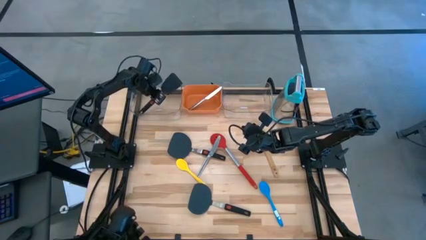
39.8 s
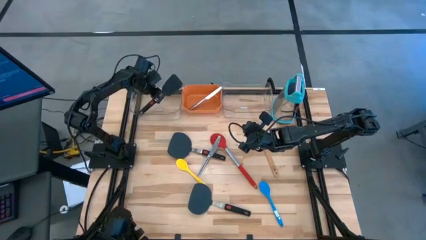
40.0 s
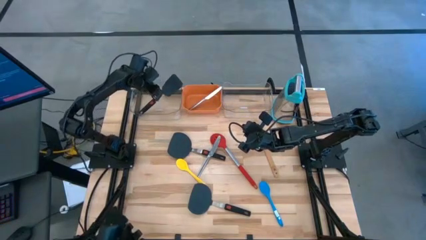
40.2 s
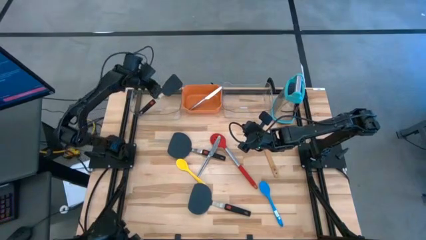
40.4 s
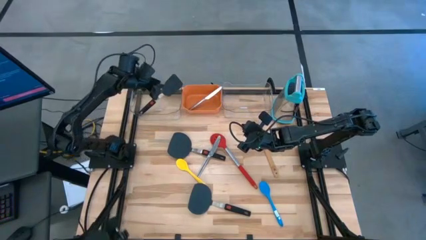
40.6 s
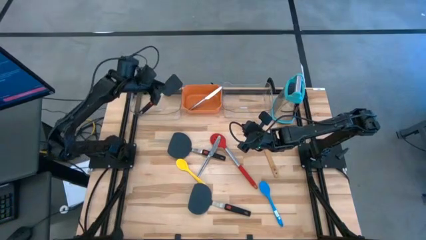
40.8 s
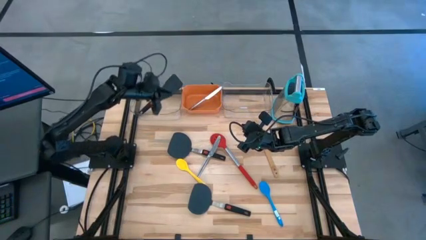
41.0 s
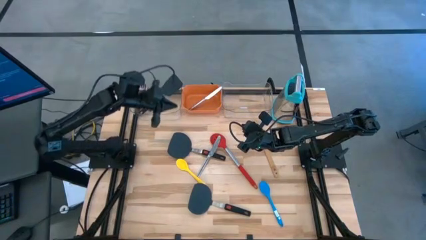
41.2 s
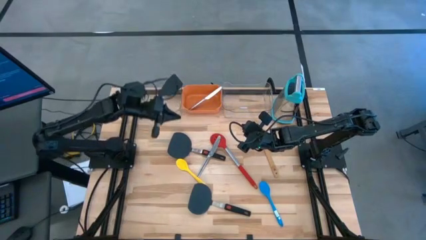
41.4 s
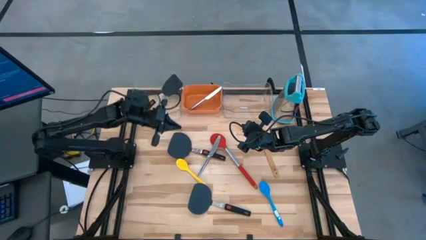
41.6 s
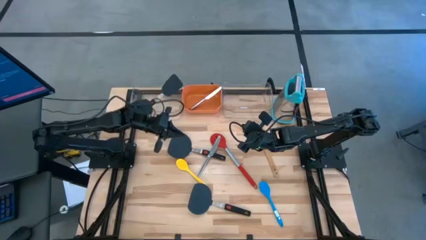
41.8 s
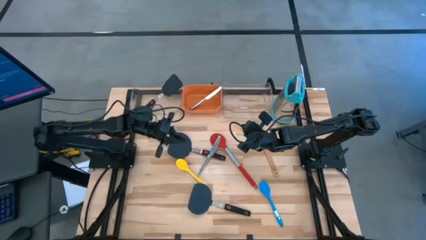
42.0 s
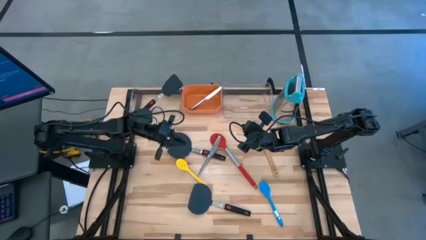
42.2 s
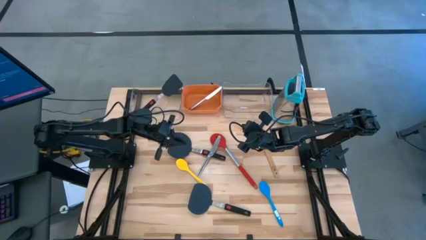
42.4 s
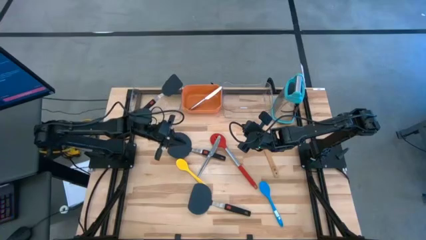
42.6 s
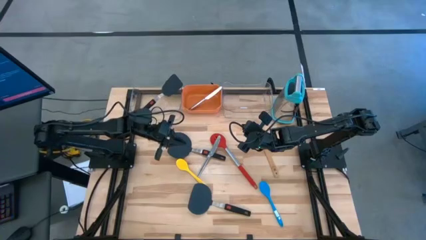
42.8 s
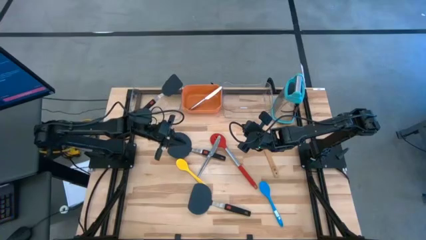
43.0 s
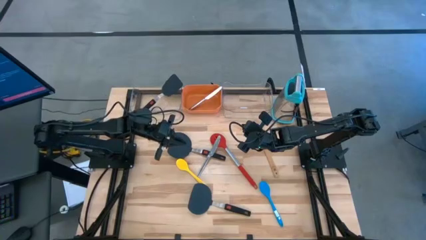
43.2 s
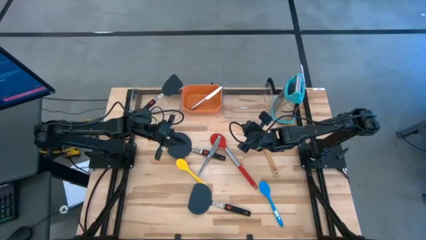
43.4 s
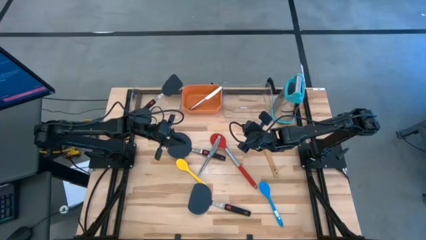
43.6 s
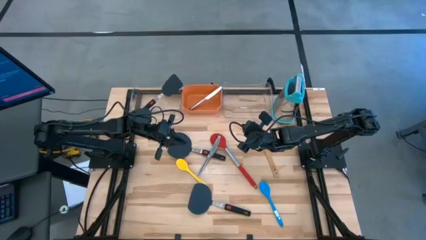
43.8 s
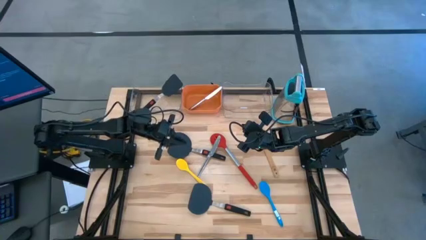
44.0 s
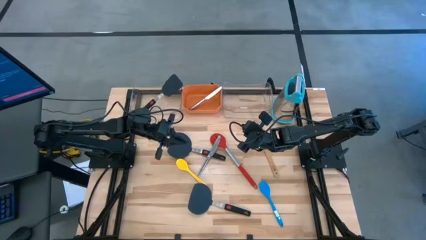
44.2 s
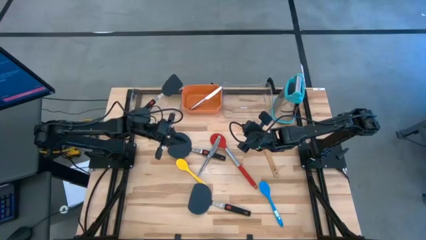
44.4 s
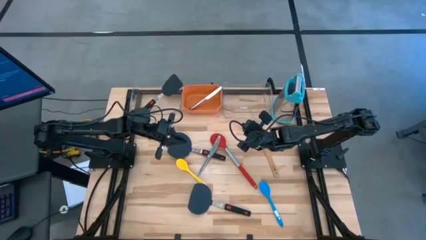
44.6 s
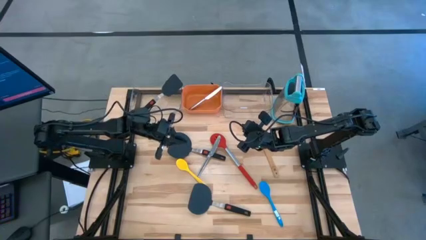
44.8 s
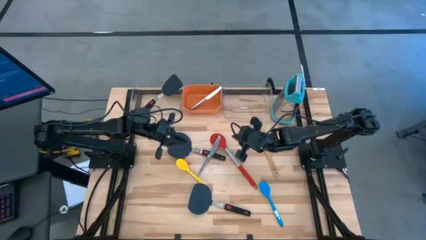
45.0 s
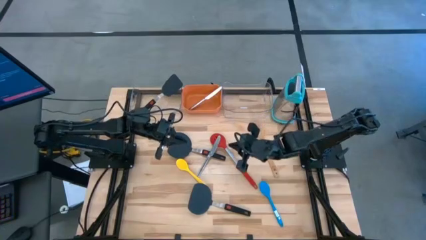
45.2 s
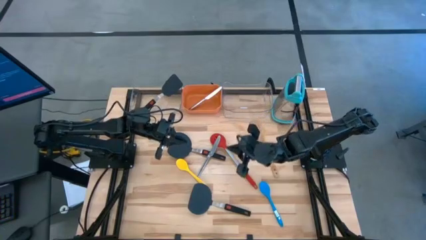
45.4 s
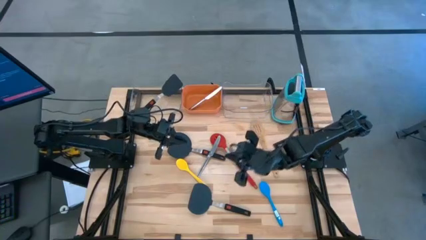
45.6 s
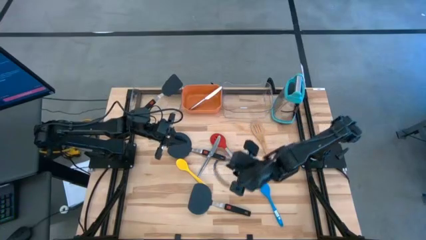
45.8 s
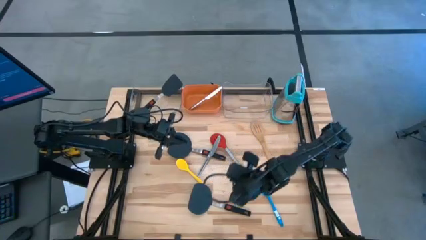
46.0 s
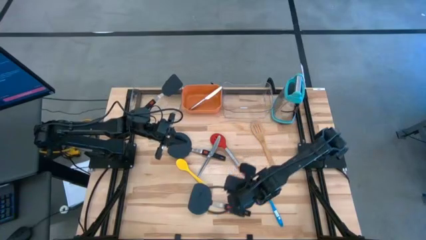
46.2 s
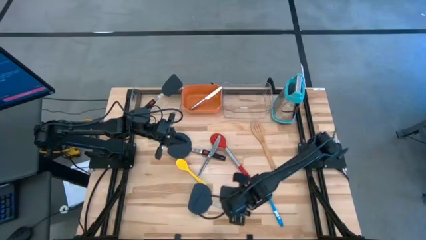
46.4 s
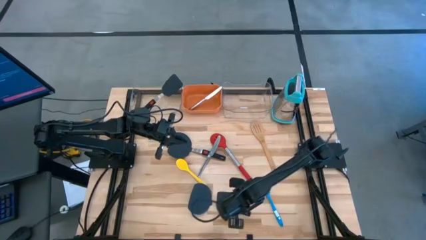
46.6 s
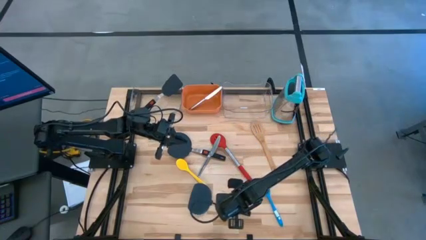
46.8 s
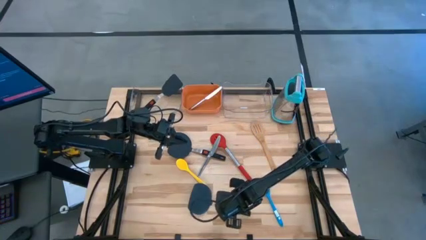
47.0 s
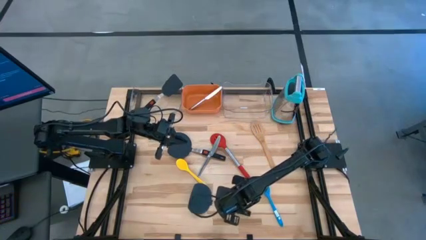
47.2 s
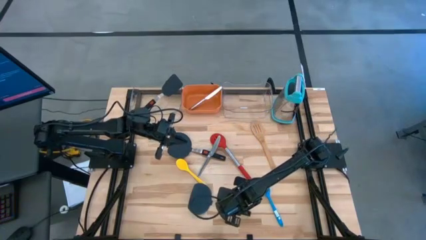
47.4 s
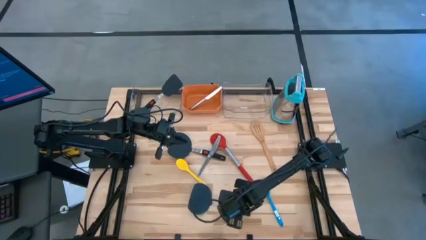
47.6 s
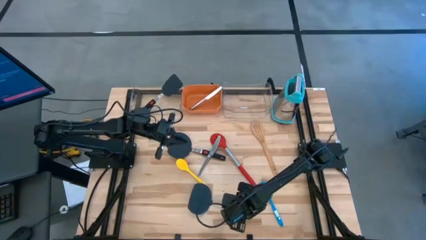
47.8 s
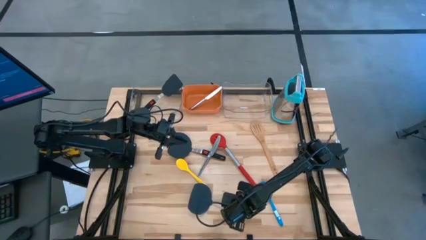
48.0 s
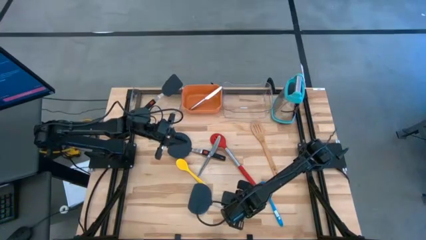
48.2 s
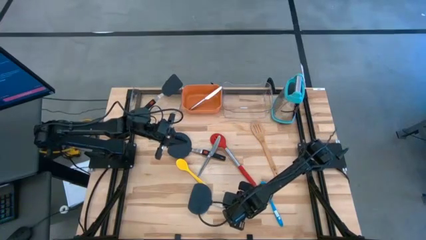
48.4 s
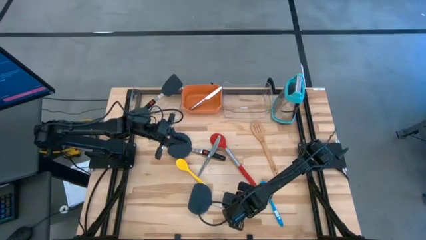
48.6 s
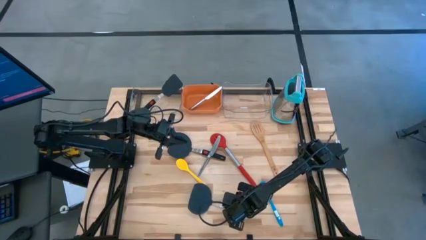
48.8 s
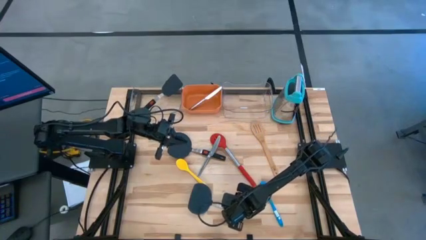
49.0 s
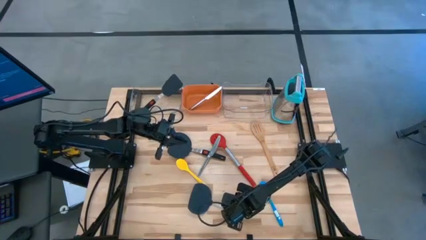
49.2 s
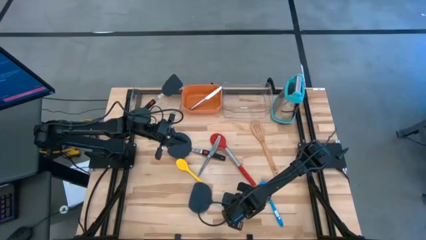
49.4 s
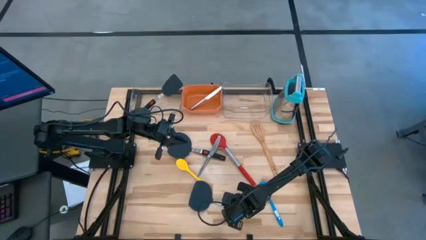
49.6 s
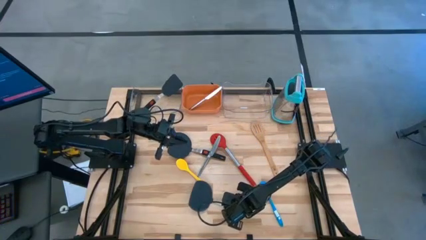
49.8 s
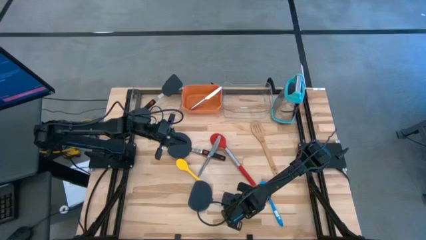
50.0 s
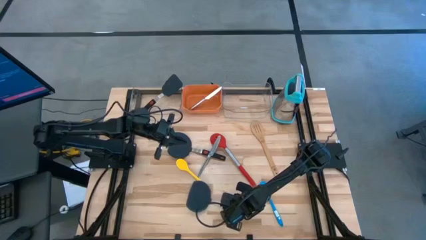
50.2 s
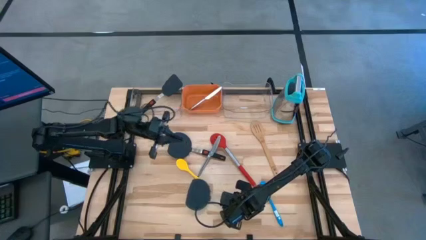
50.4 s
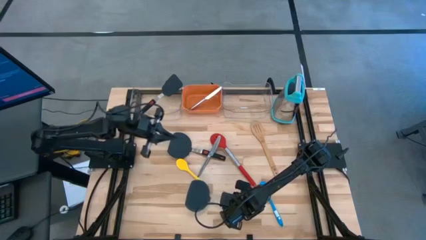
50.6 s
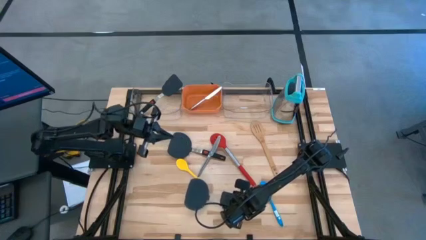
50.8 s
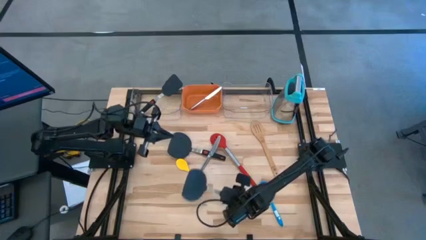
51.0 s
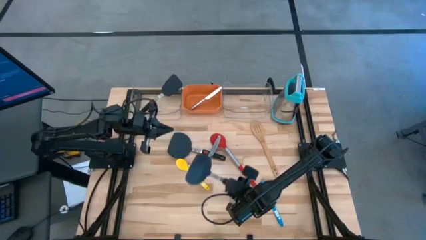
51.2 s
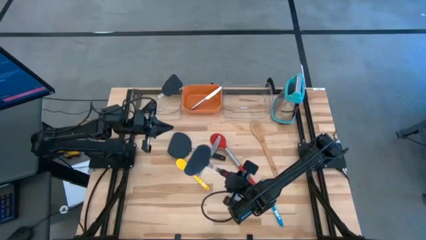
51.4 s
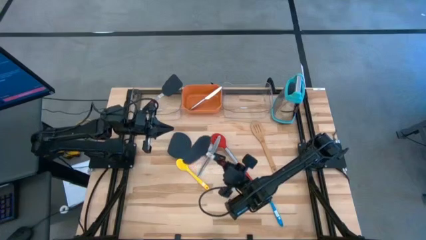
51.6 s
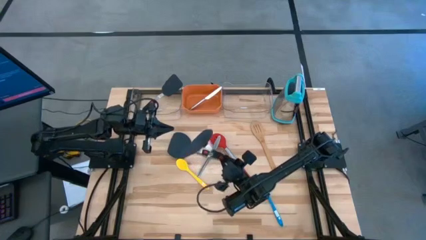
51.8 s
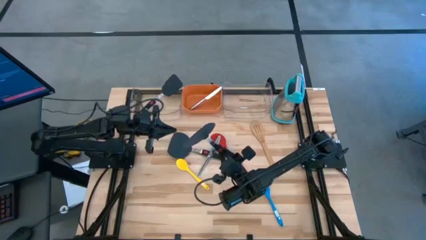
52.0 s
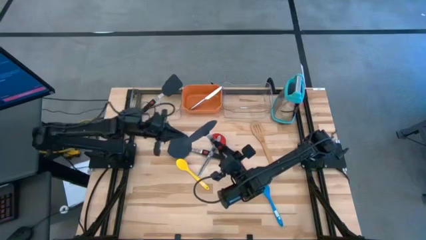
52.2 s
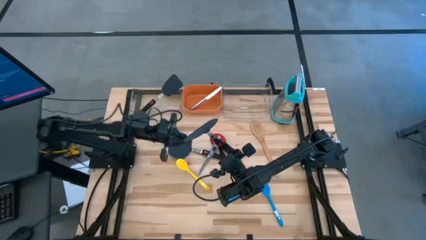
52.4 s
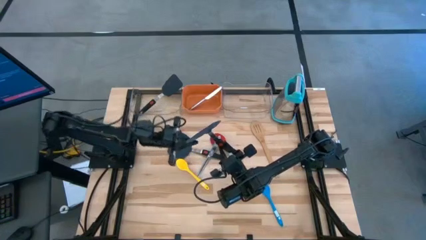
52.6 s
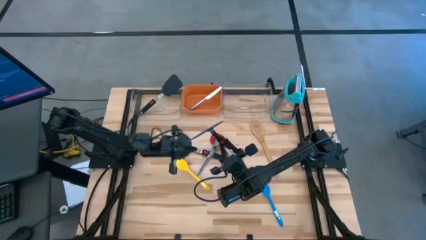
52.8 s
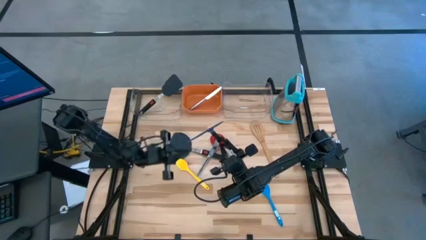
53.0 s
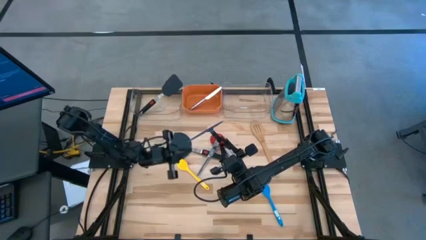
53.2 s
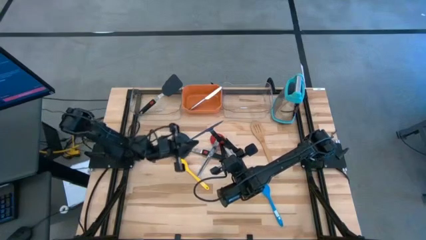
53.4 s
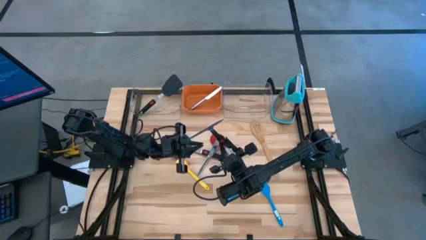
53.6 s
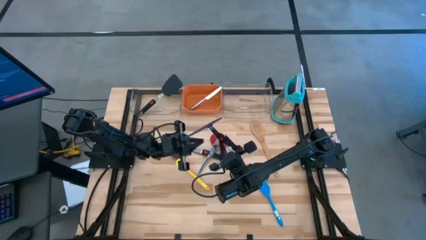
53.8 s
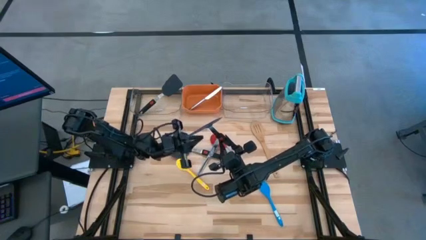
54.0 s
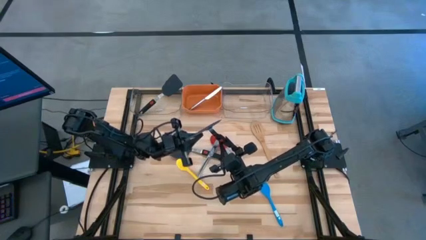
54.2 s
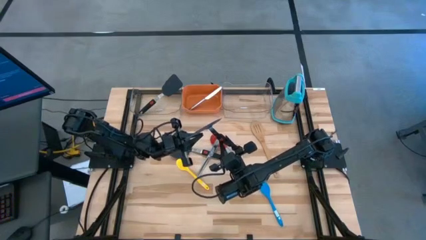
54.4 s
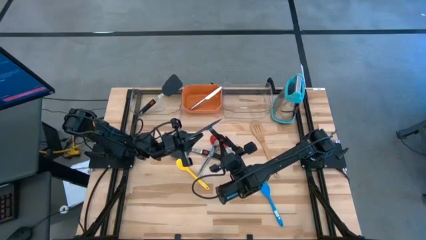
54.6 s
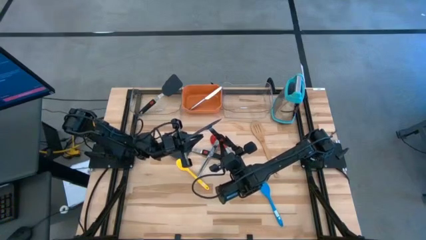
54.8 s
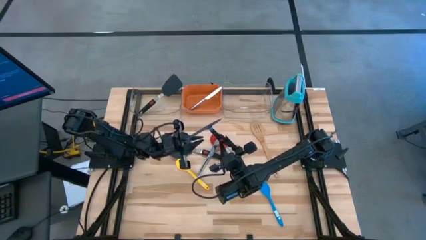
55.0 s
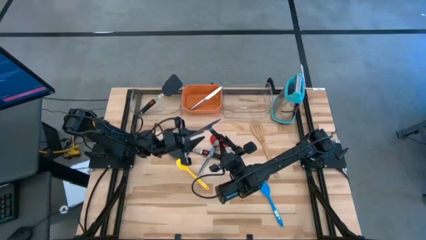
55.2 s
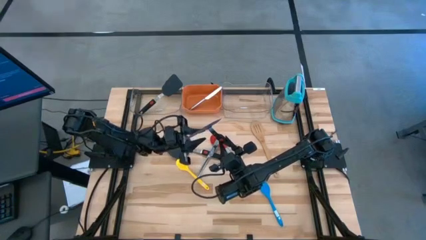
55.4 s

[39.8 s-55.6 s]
Task: Pick & Place Kitchen Items
Put the black spatula into the left transparent bin
